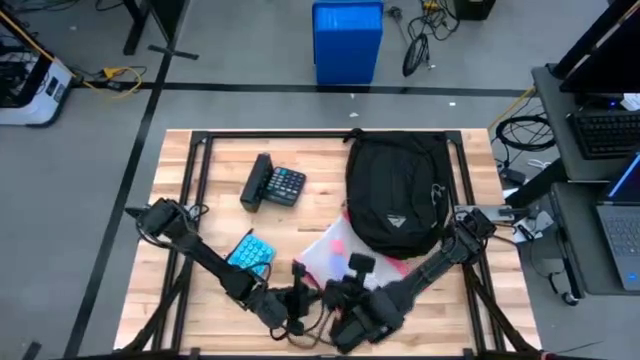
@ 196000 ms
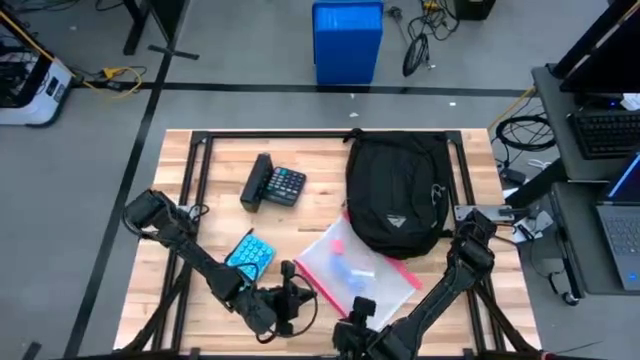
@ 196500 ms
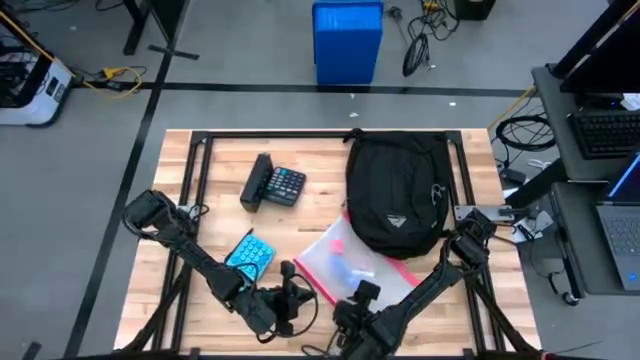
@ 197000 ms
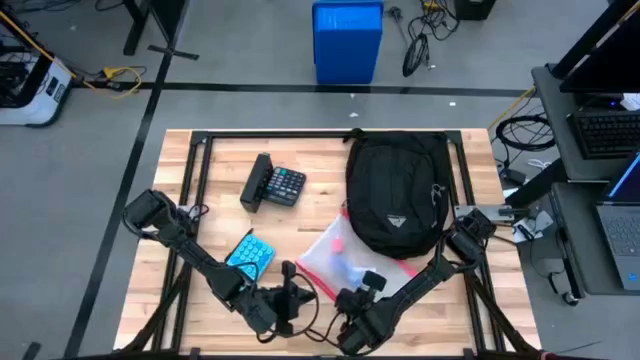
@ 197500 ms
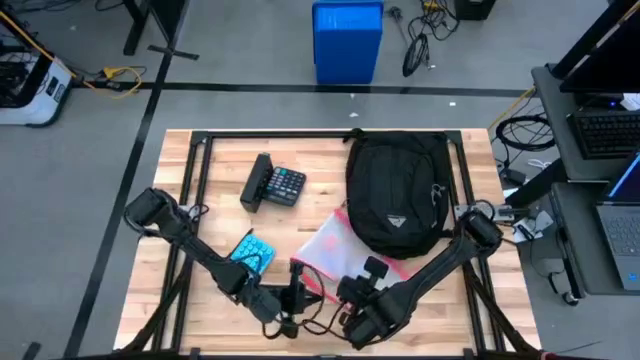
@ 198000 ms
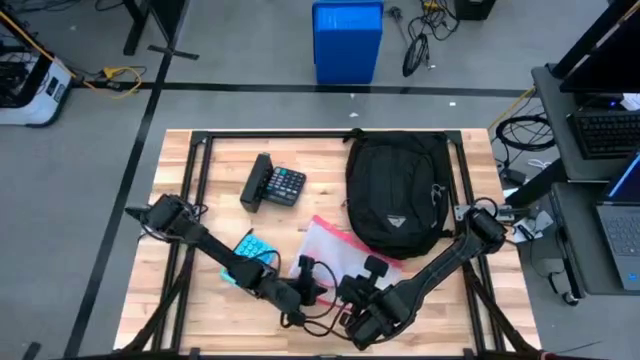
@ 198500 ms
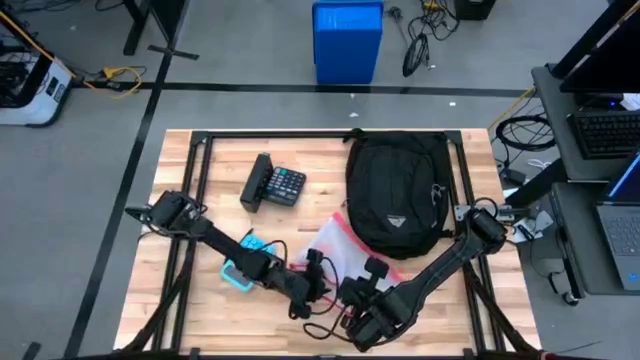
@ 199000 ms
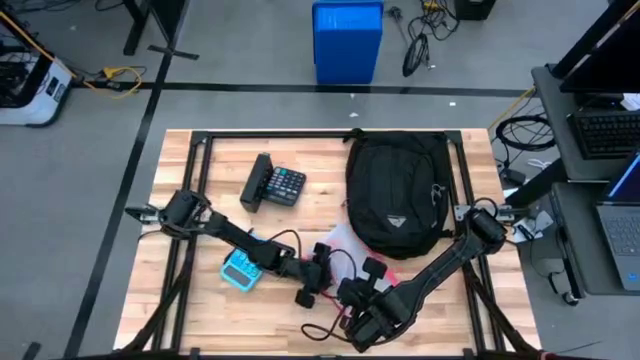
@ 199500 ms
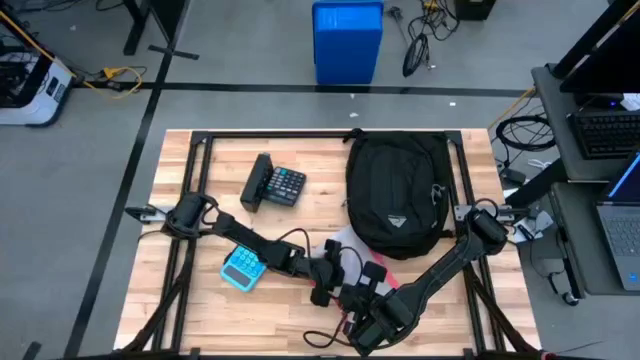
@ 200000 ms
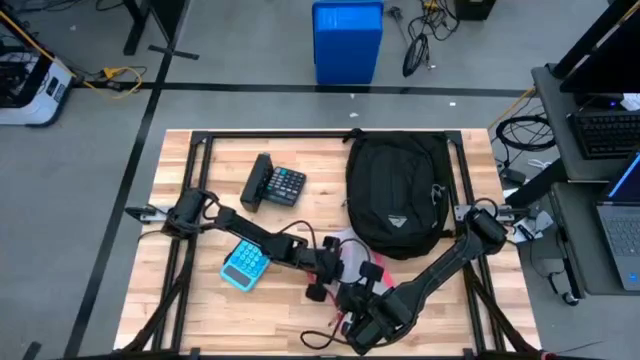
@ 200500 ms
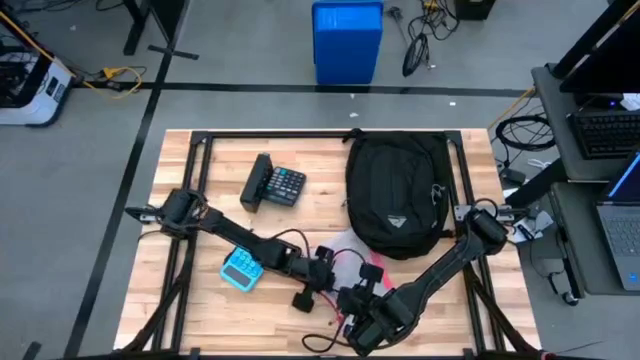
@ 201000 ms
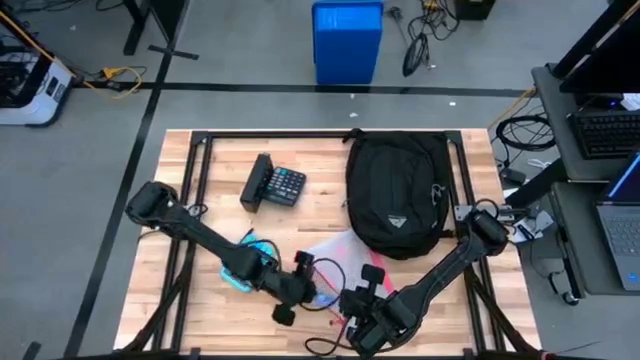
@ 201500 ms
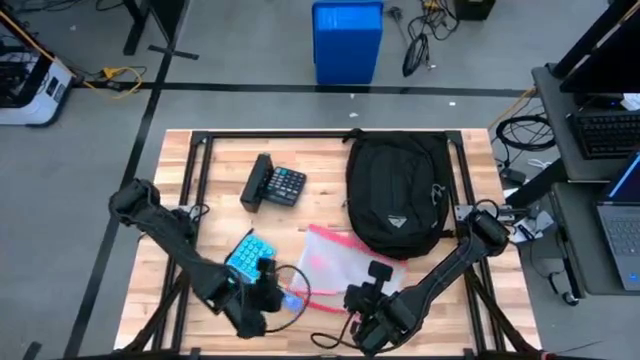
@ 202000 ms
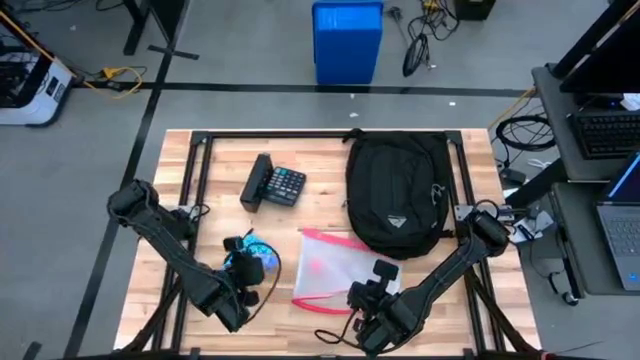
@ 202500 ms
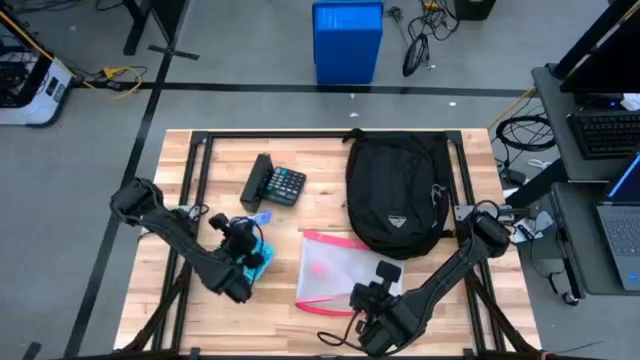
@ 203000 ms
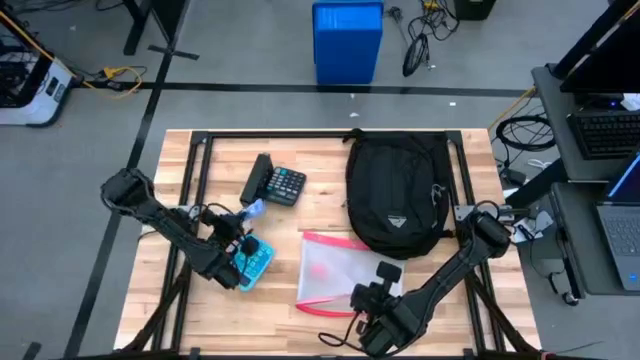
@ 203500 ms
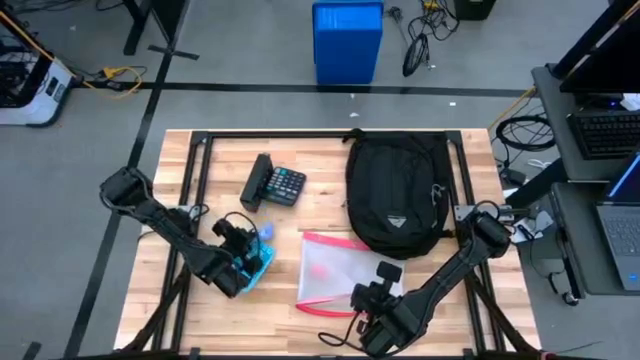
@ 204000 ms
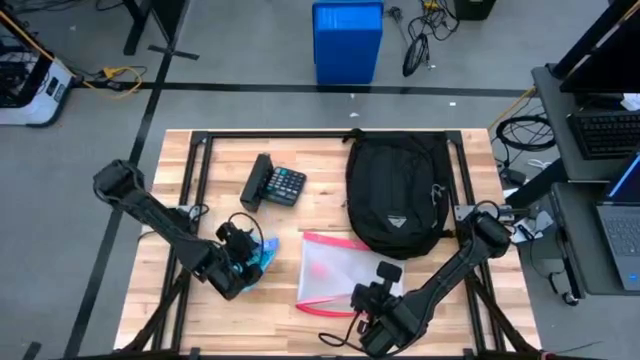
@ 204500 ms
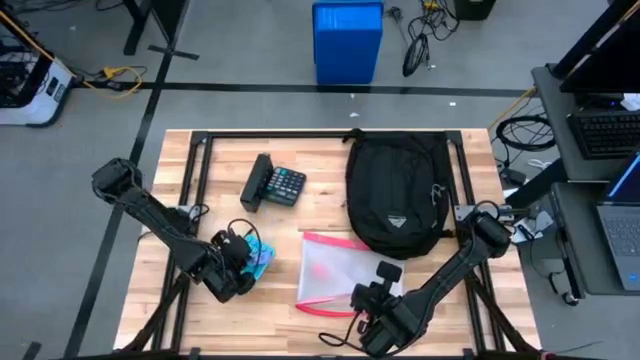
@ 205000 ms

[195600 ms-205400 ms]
Task: Unpack backpack
Remove the violet chocolate bar from the white zip bag

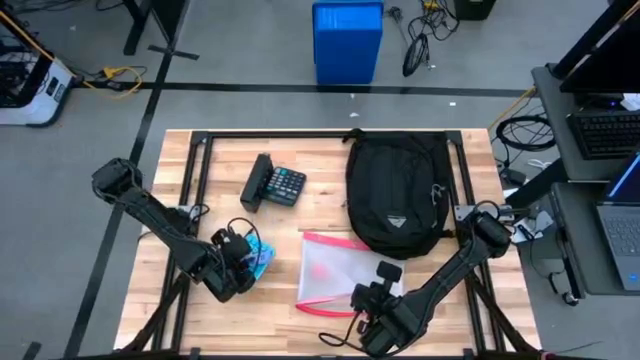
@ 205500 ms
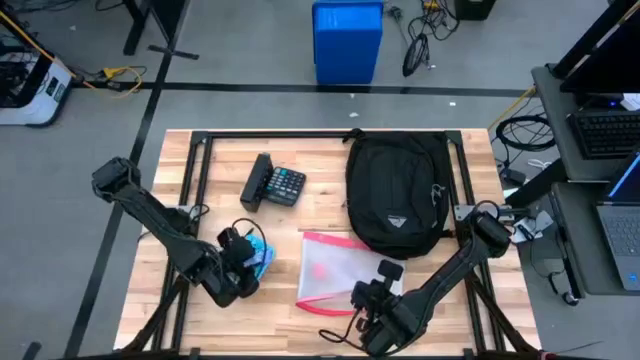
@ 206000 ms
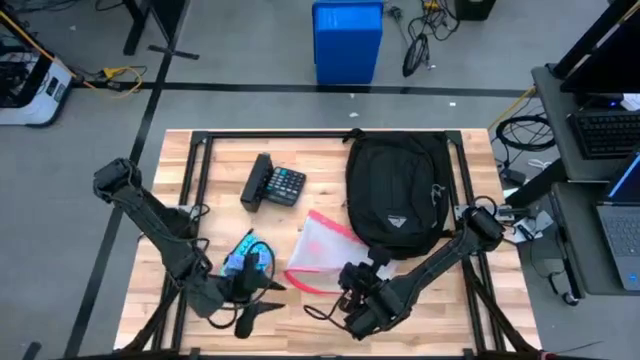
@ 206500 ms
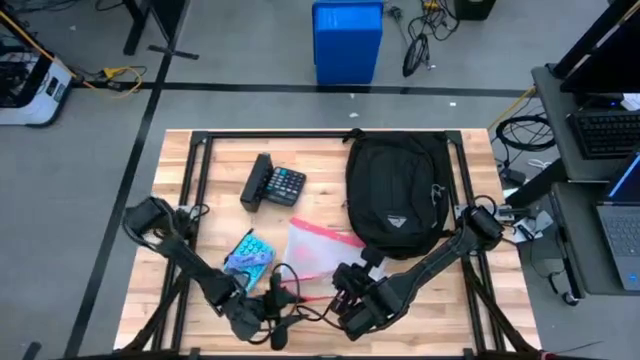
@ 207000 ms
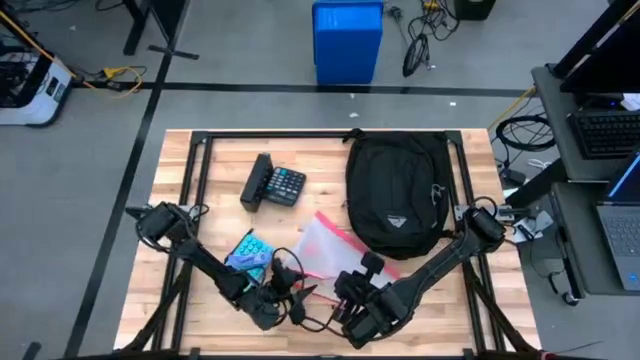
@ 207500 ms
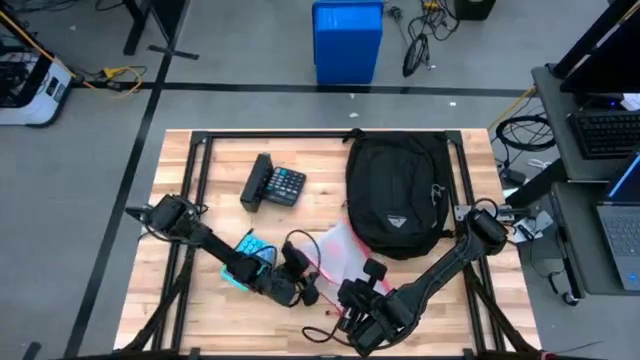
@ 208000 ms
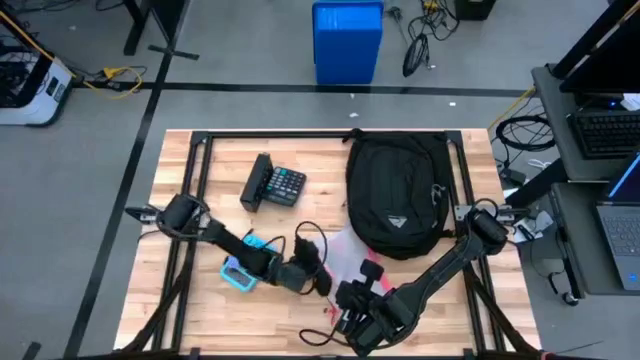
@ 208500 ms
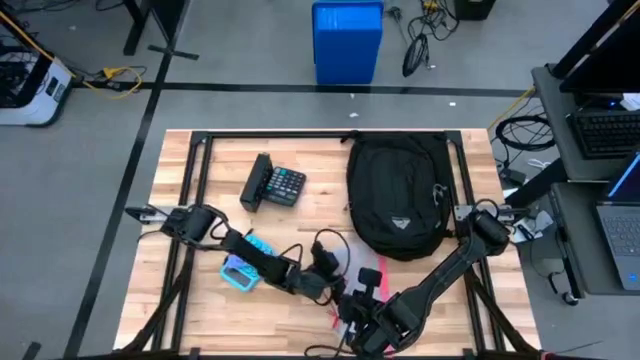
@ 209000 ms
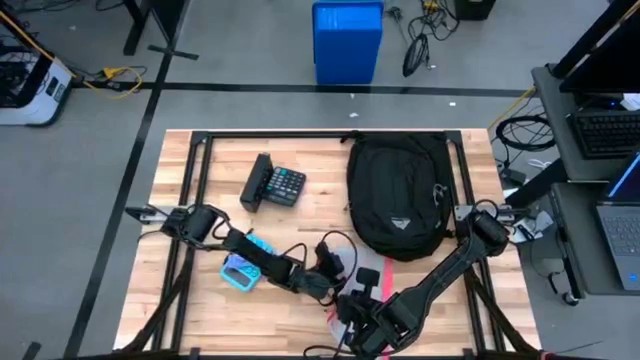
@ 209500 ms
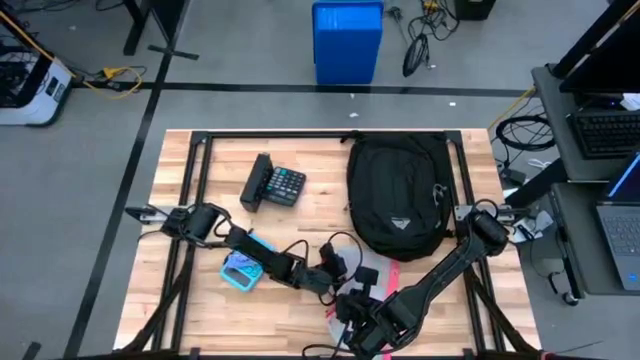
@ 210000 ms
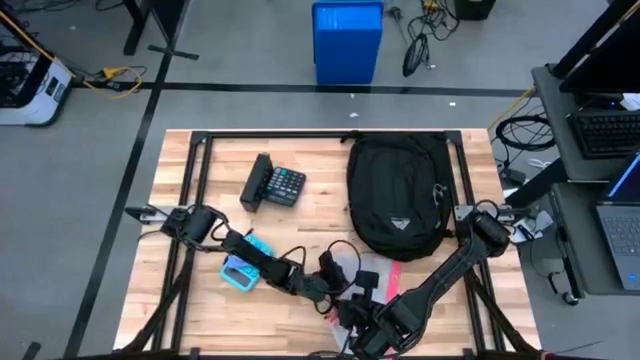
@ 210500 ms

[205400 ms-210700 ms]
Remove the pink earphone from the white zip bag

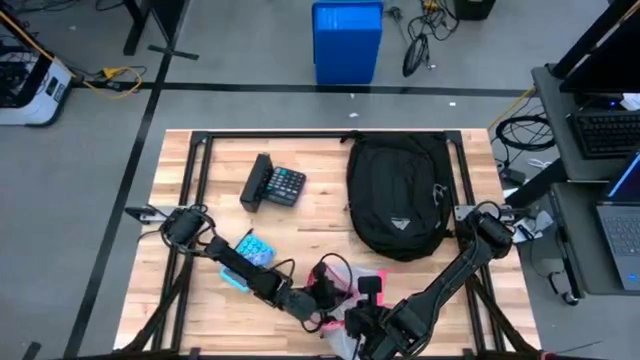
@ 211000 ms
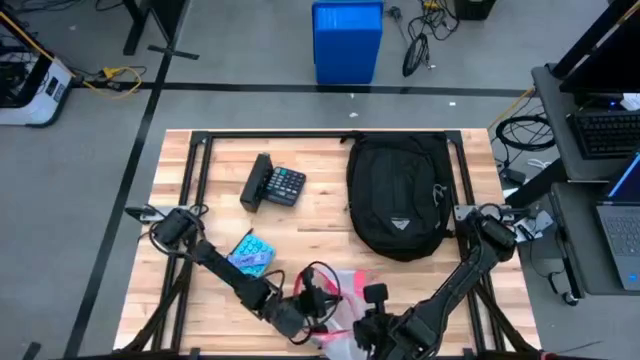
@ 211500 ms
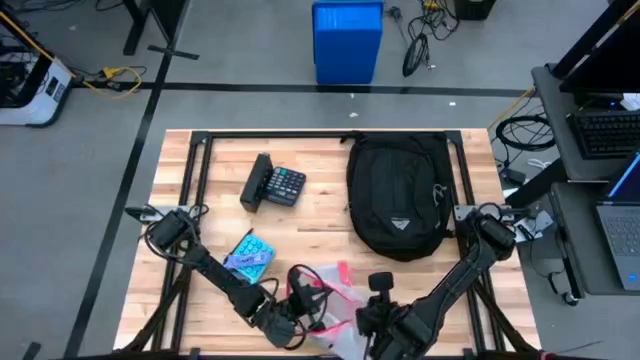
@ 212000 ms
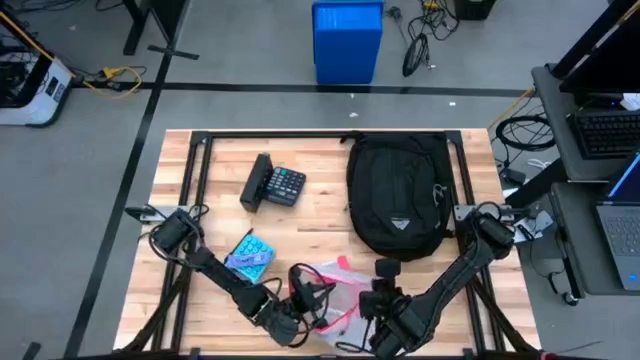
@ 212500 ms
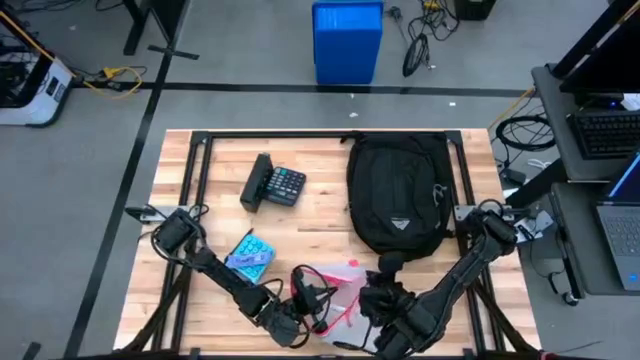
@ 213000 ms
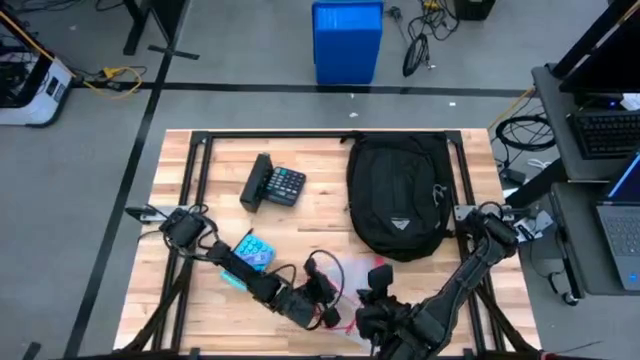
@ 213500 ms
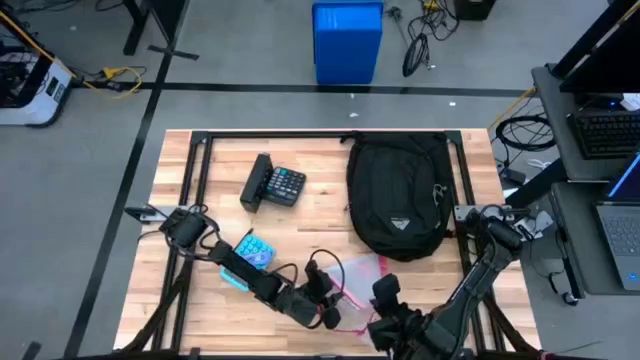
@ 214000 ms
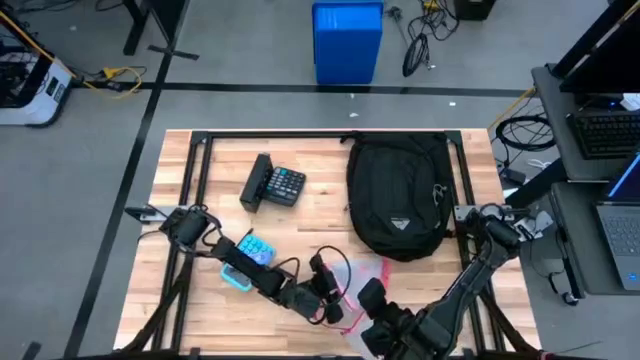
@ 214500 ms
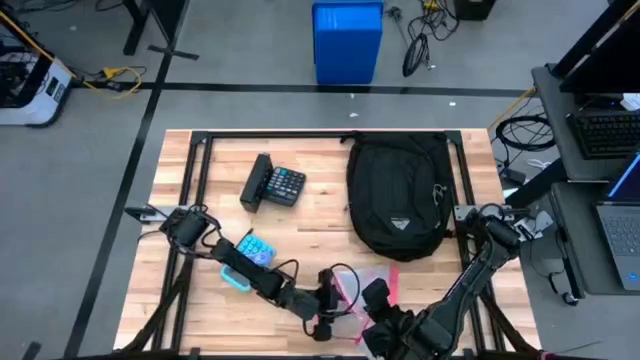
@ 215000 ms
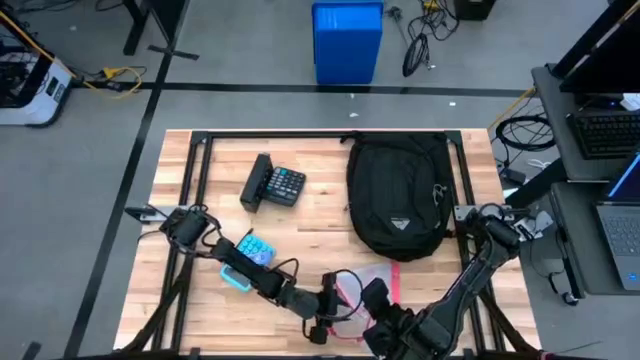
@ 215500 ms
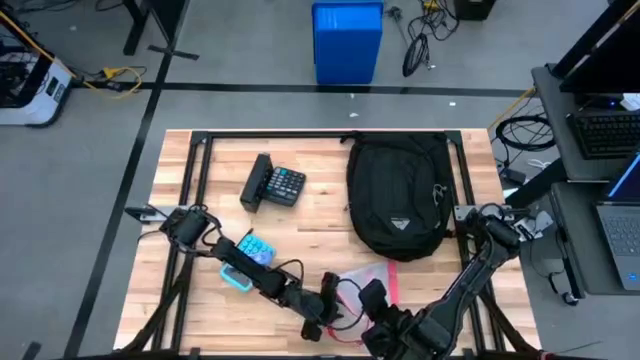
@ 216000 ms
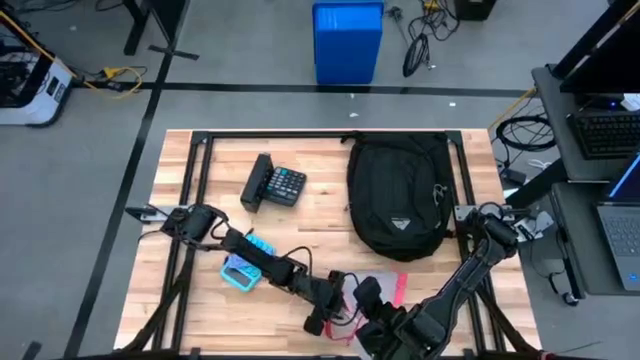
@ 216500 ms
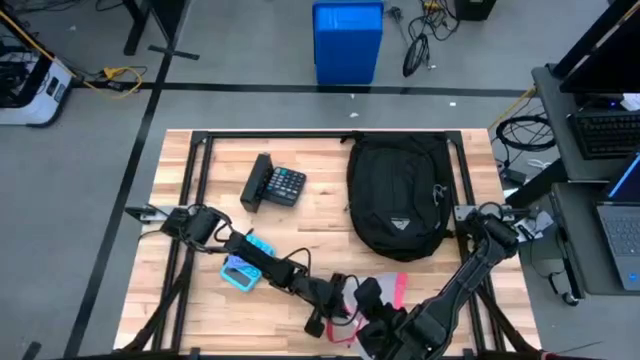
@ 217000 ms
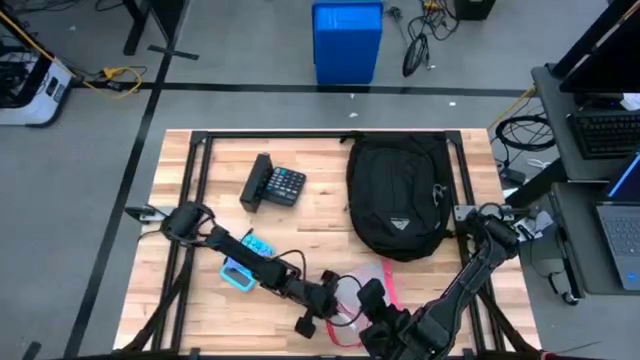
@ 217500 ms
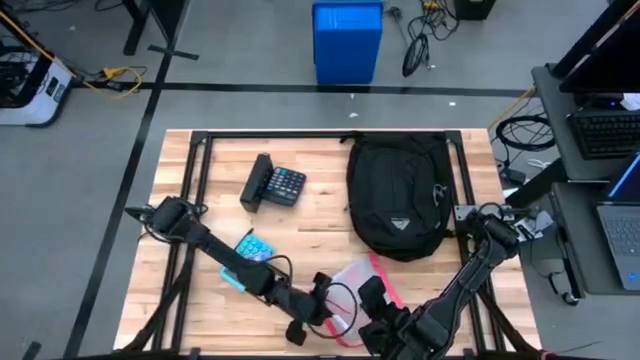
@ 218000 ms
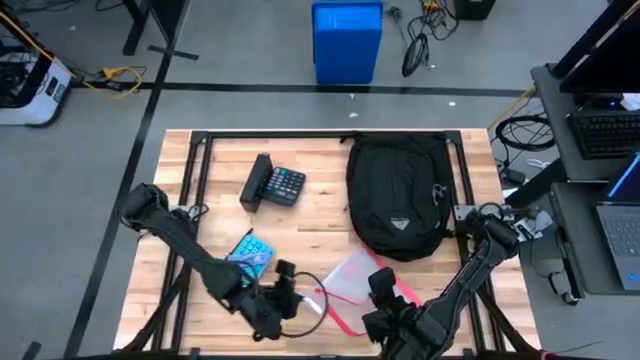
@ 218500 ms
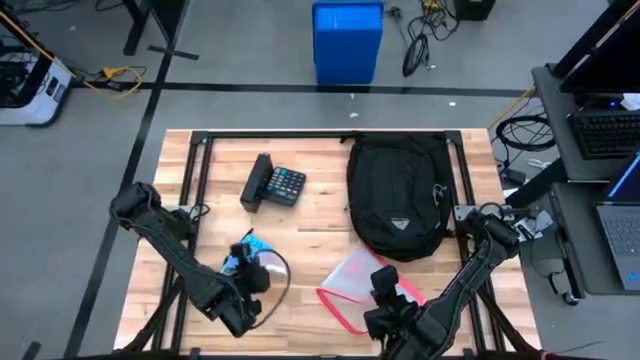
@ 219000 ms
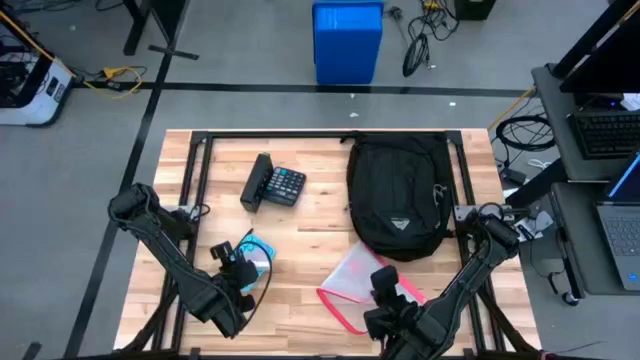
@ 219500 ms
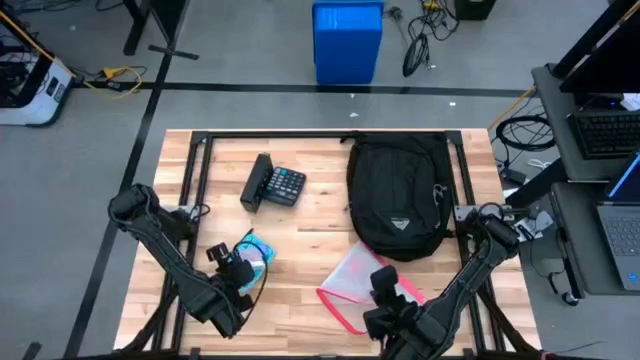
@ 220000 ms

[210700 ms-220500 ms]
Remove the pink earphones from the white zip bag
